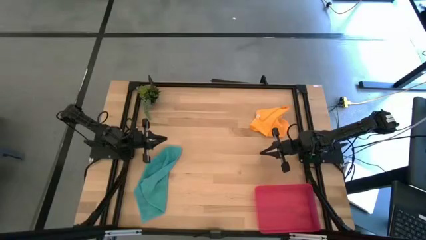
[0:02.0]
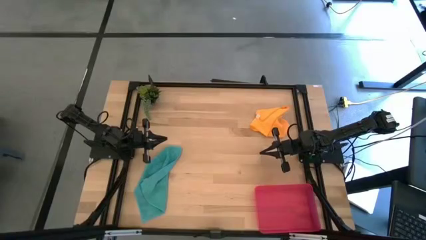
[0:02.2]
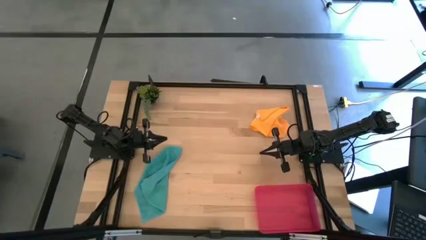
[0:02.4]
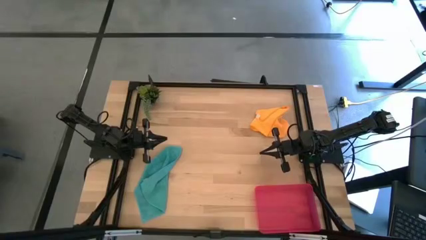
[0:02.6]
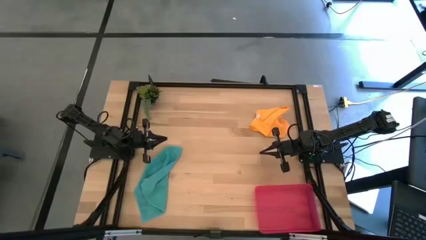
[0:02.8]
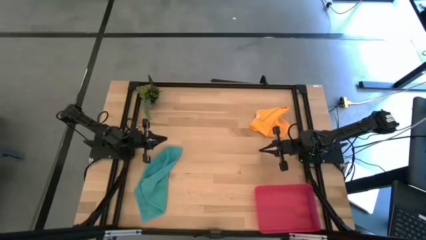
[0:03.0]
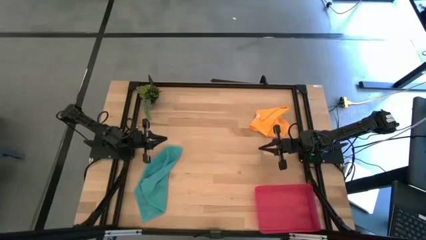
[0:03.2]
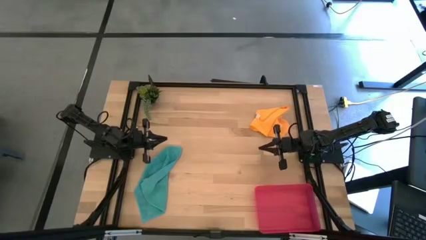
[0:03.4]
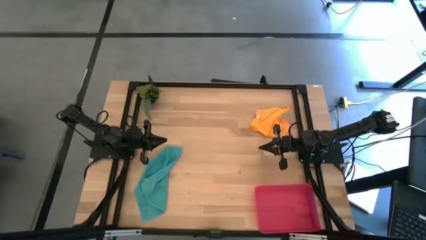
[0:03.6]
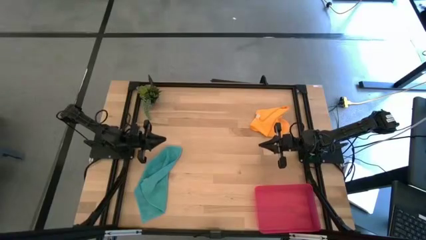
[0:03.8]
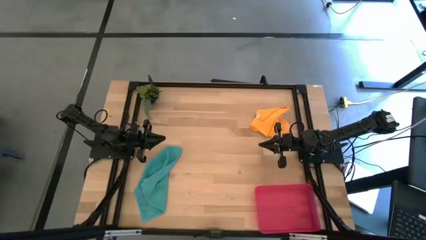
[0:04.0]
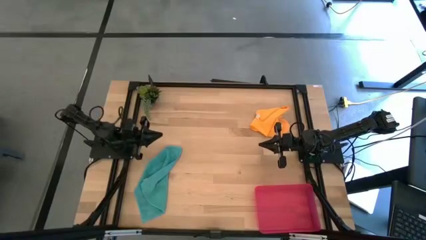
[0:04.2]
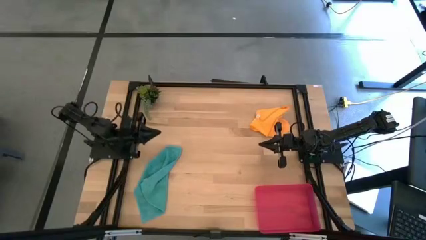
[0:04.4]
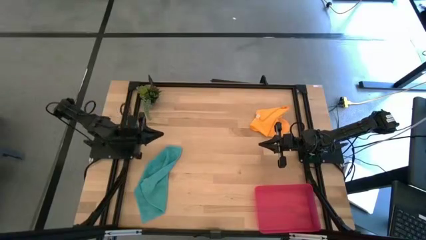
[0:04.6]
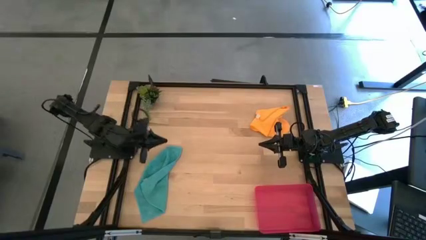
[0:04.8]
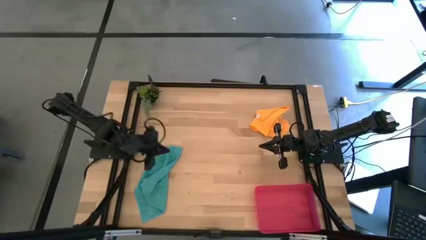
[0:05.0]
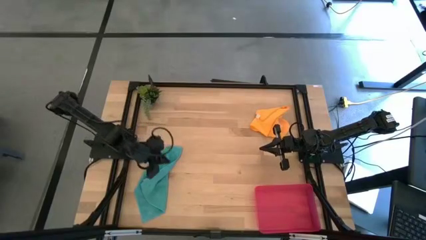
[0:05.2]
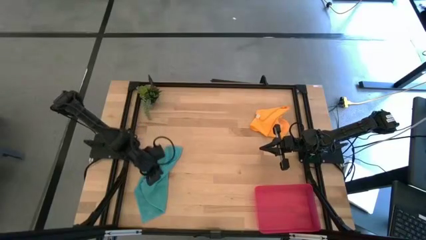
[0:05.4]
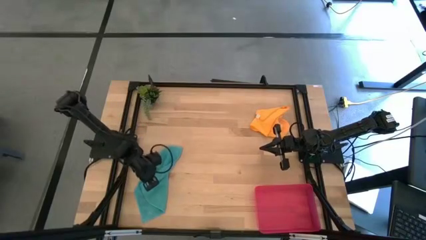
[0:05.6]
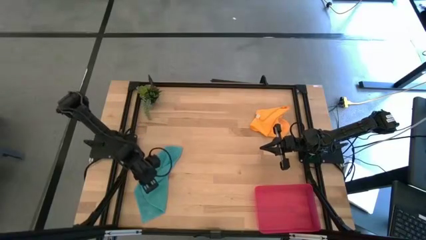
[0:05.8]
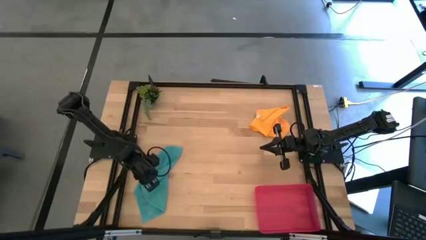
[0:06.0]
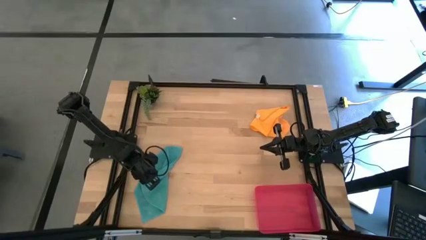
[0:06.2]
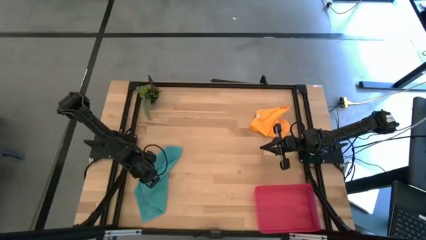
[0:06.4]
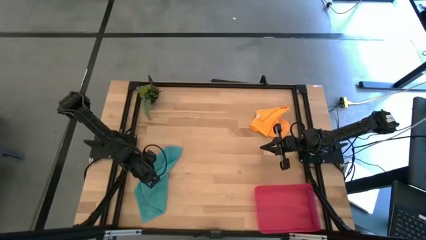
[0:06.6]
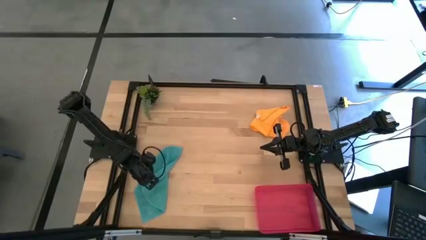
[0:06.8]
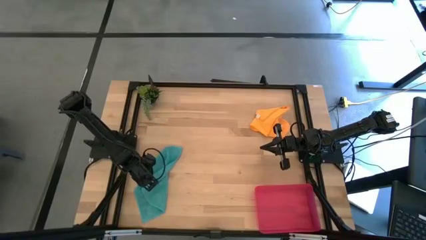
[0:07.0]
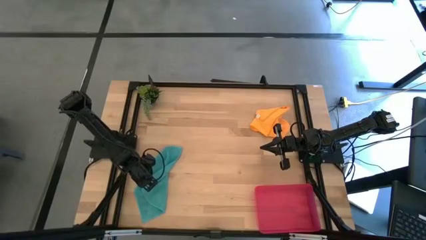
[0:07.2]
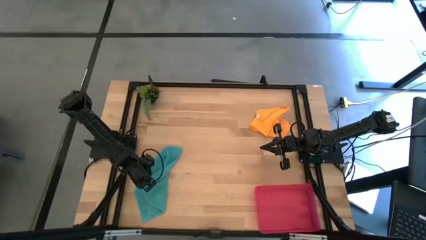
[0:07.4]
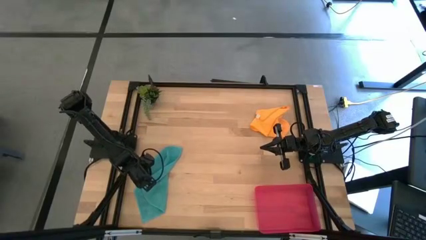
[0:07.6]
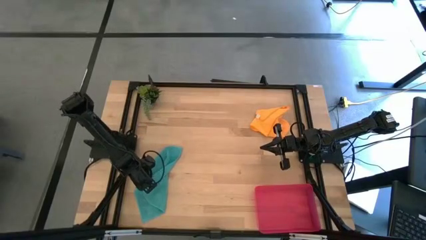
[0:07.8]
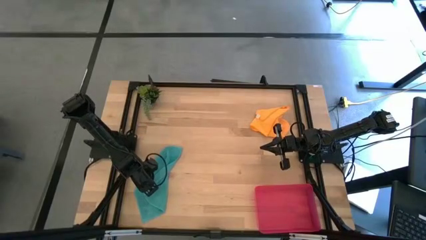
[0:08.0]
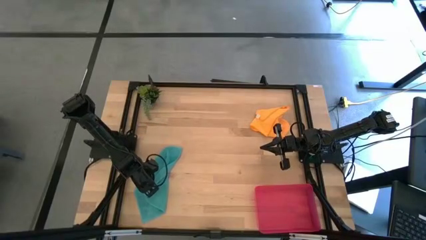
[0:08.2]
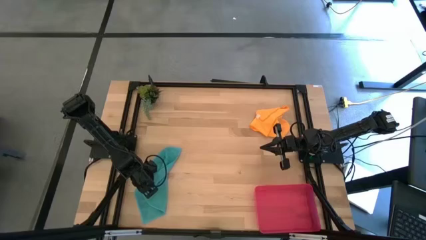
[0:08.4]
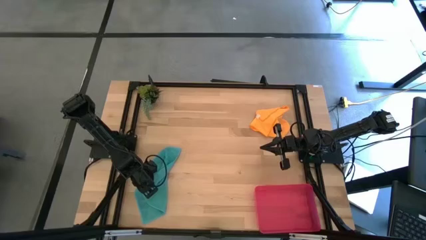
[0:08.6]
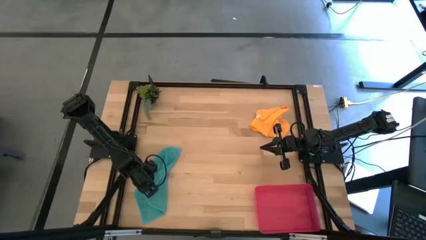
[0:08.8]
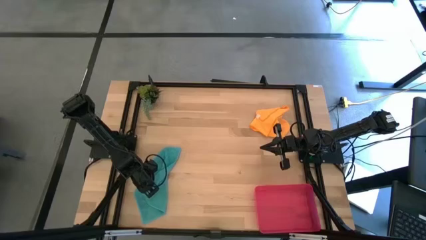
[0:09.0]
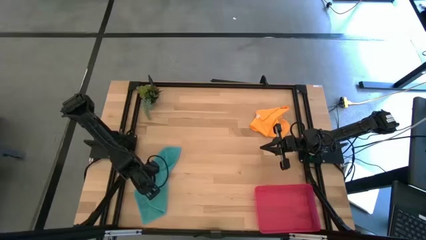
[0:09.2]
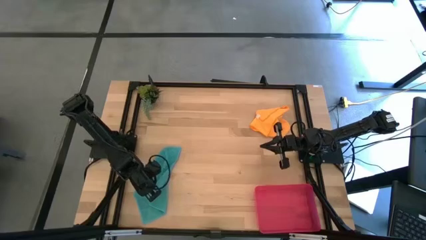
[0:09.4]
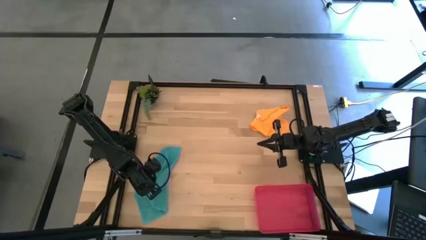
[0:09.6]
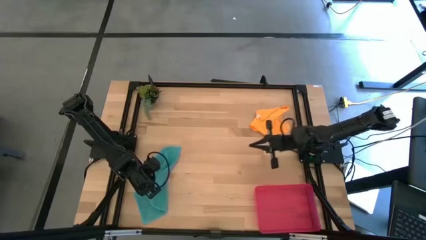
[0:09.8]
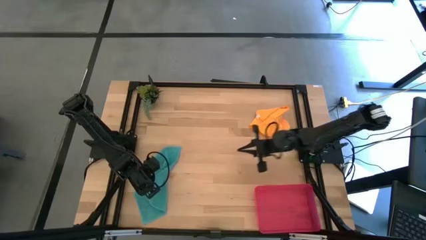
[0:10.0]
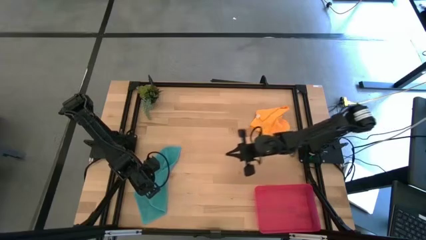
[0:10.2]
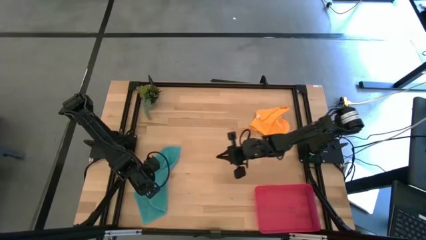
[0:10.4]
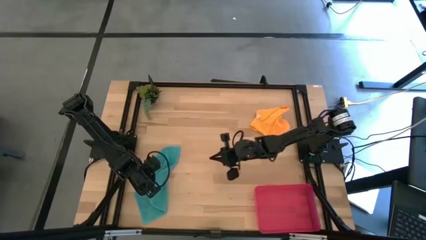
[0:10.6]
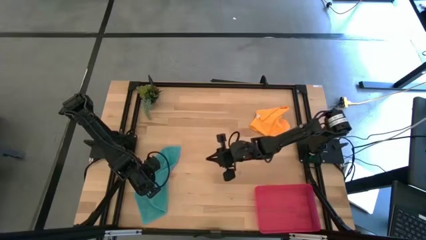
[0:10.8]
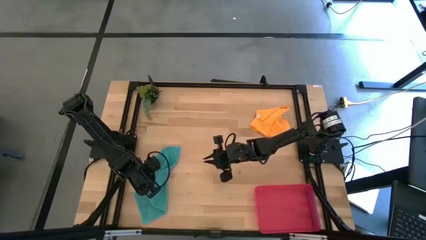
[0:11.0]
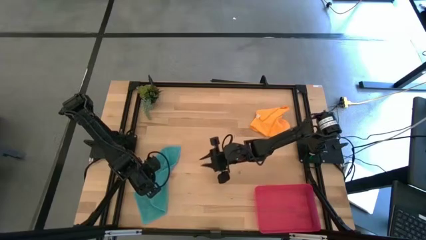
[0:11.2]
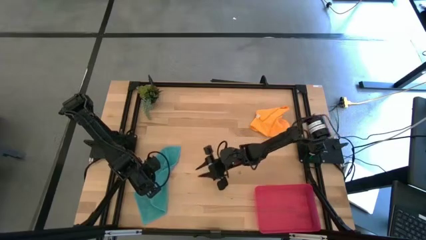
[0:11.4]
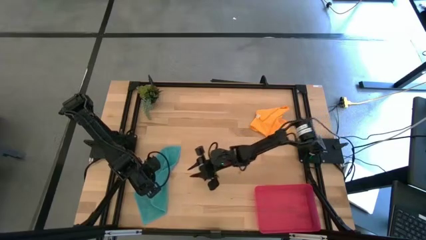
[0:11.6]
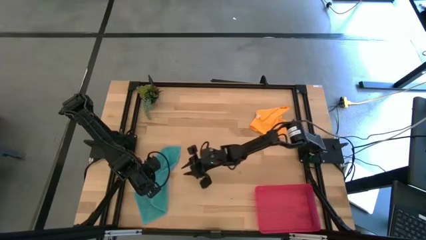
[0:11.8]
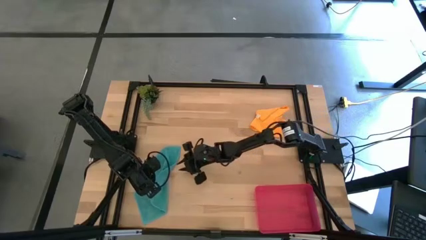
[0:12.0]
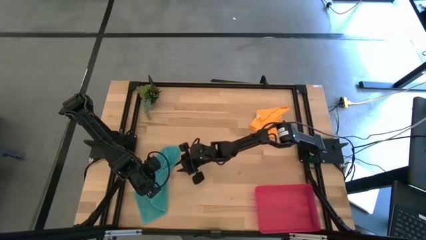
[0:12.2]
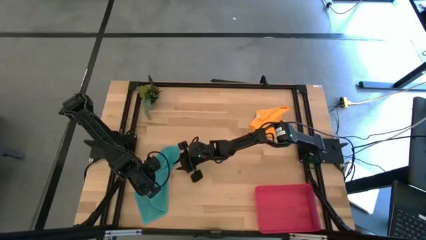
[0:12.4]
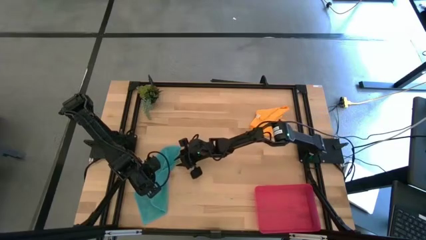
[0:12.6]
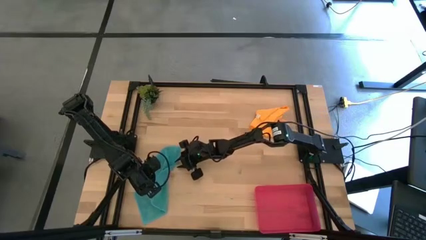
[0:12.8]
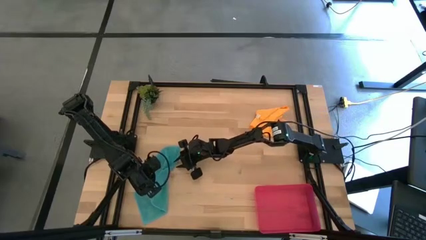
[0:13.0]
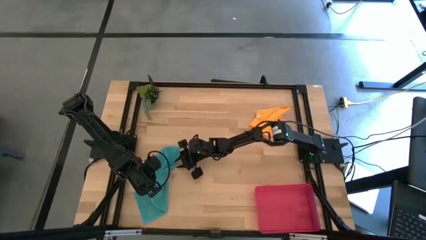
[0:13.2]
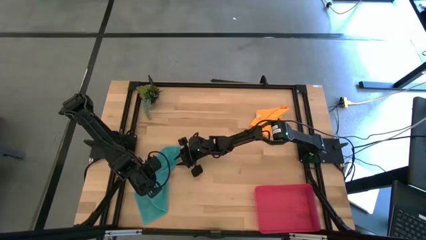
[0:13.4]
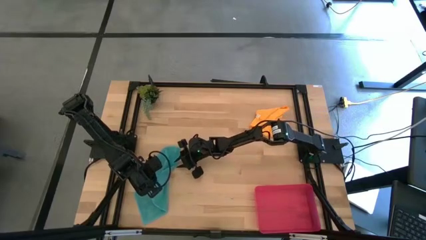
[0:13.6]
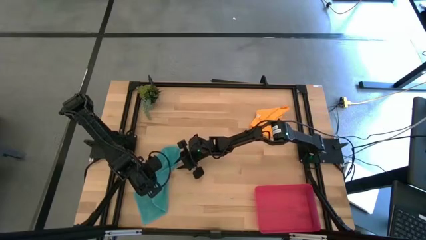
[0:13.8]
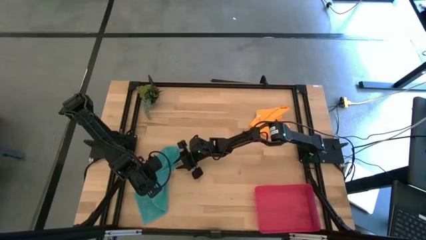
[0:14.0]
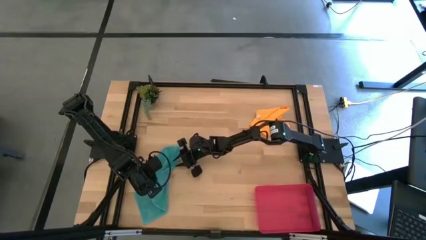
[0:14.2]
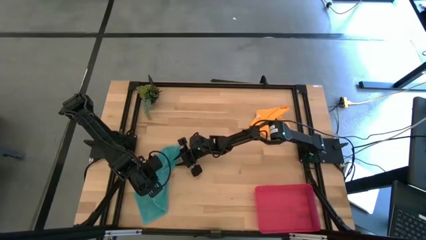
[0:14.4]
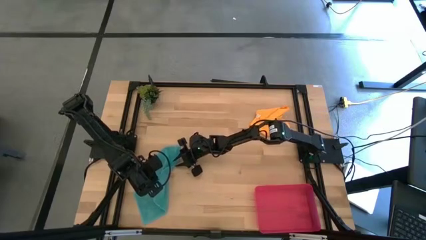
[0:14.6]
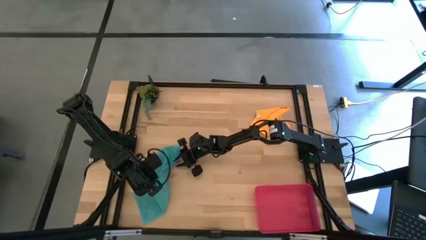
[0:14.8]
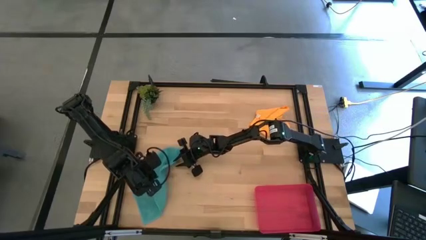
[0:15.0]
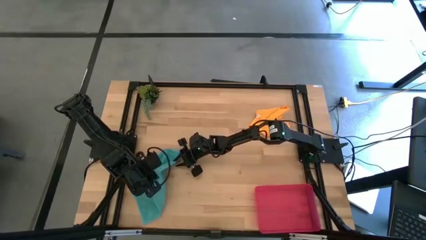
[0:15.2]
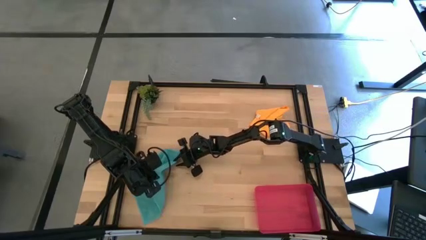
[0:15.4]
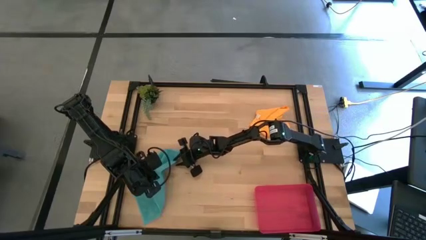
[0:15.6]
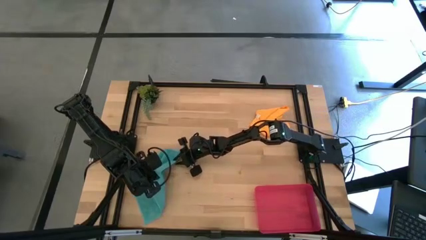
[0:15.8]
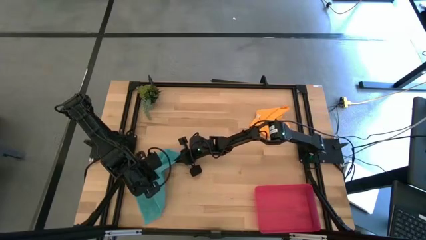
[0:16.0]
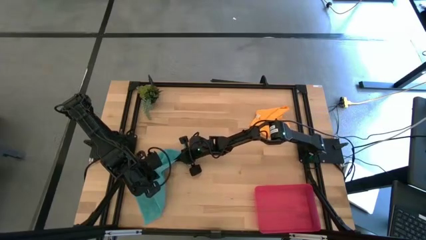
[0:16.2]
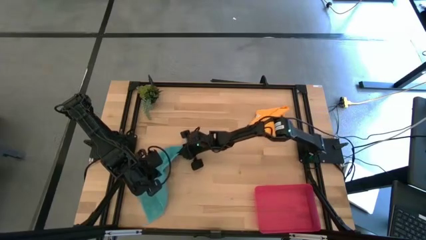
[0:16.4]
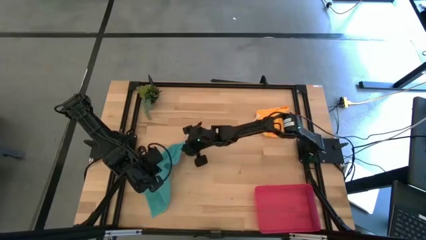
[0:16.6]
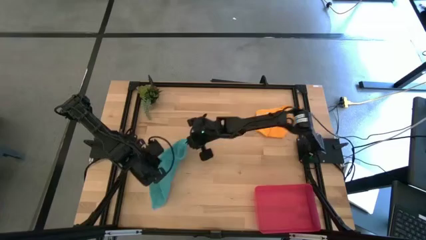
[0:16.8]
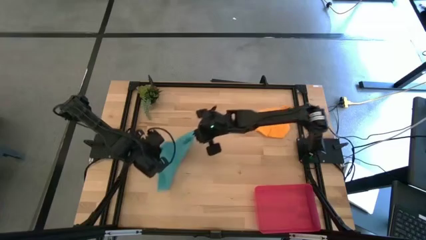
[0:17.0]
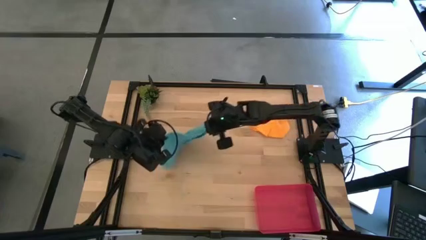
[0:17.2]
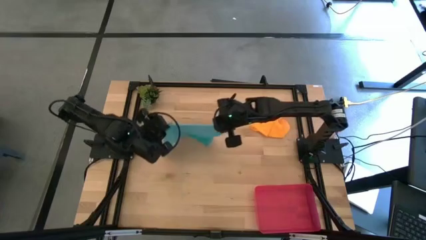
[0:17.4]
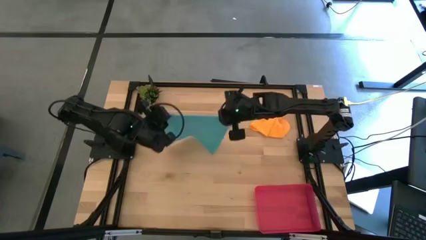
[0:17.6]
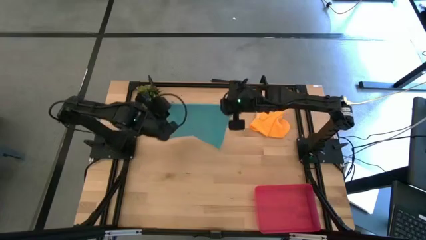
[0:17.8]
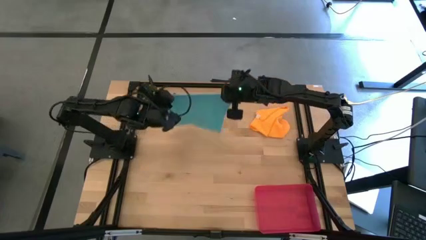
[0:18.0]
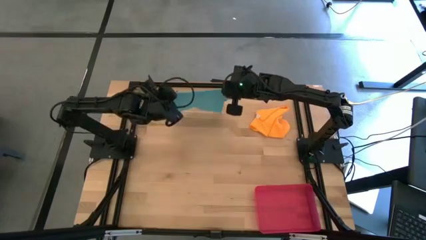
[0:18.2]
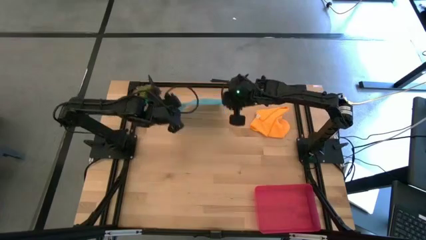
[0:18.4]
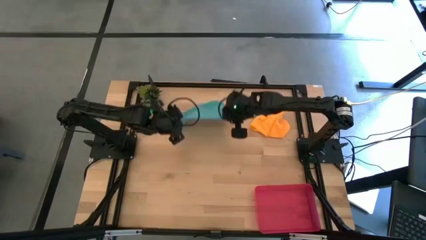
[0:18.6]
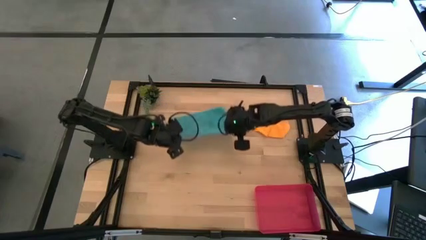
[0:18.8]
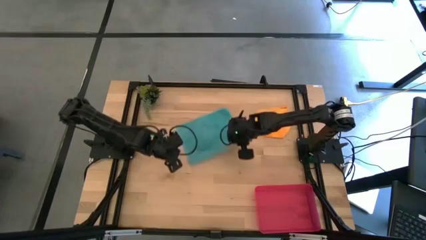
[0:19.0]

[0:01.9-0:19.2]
Task: Roll microfiber towels into tight, uniform cylinder then place into a basket
Fold the blue microfiber cloth
